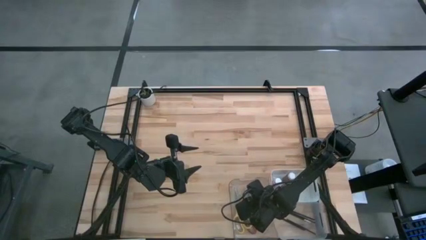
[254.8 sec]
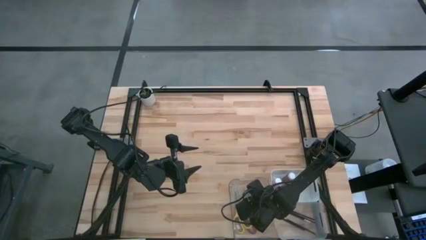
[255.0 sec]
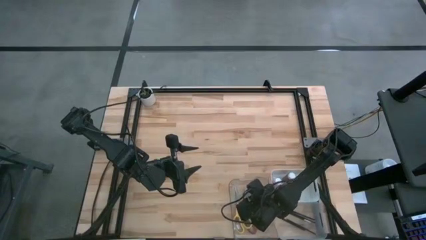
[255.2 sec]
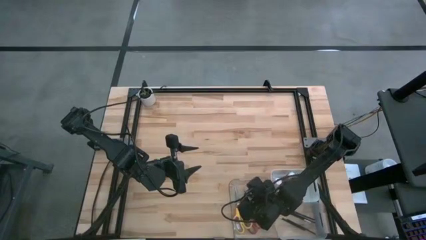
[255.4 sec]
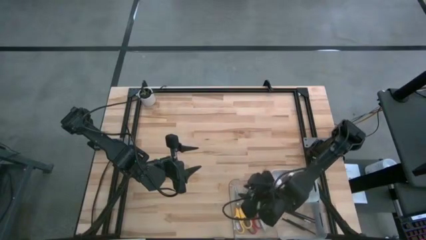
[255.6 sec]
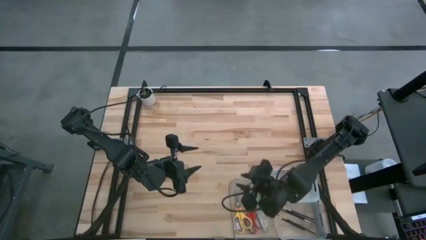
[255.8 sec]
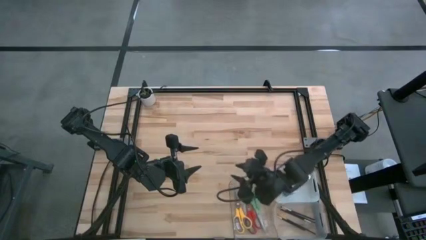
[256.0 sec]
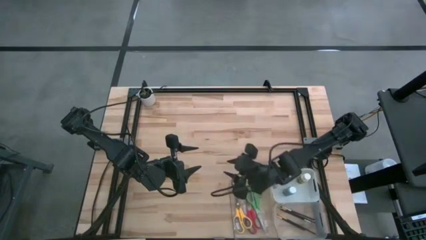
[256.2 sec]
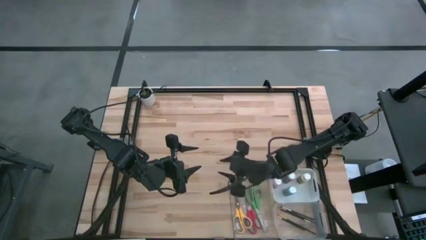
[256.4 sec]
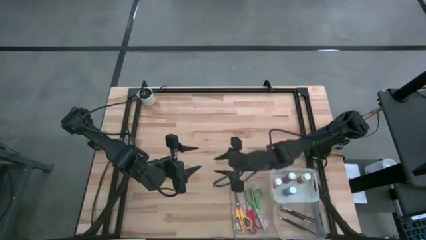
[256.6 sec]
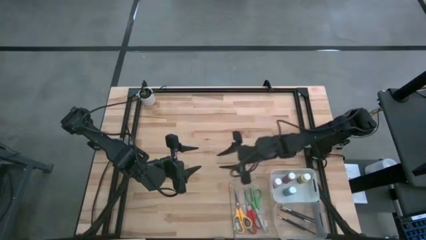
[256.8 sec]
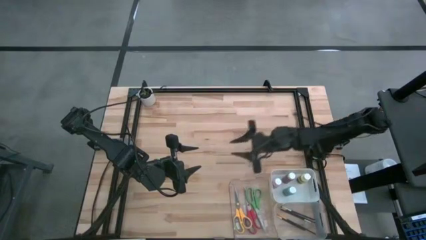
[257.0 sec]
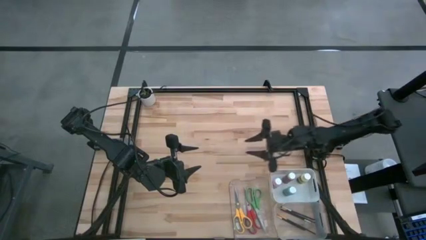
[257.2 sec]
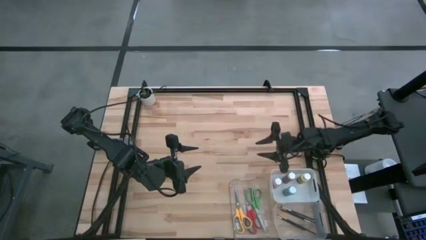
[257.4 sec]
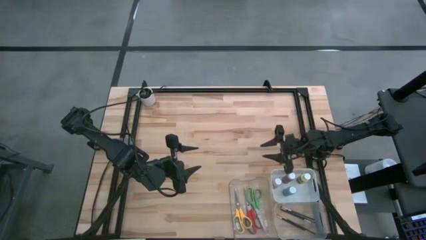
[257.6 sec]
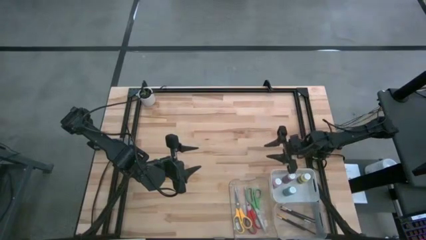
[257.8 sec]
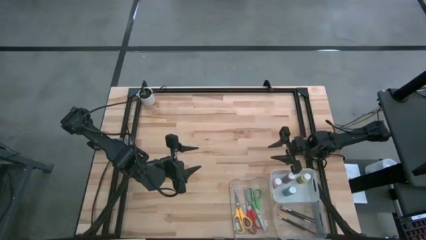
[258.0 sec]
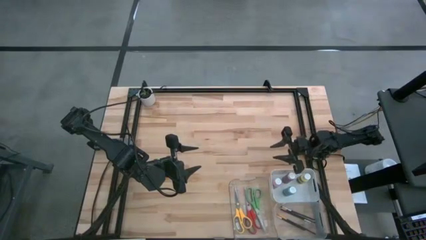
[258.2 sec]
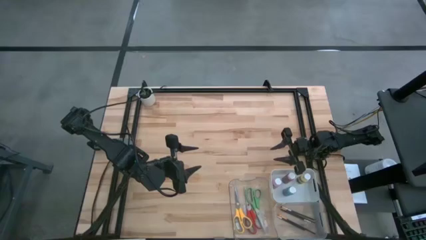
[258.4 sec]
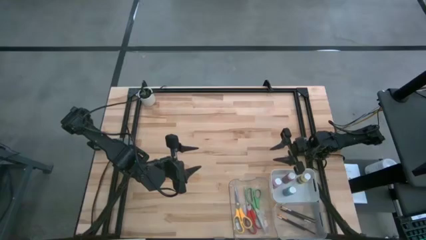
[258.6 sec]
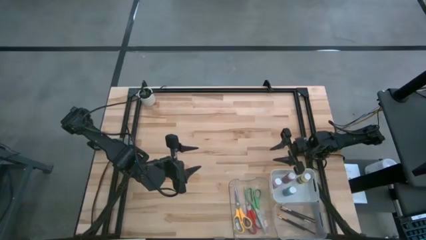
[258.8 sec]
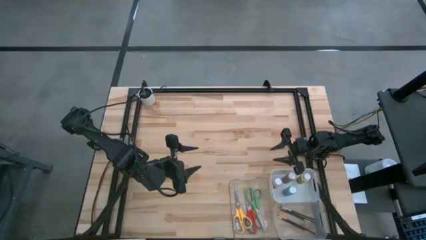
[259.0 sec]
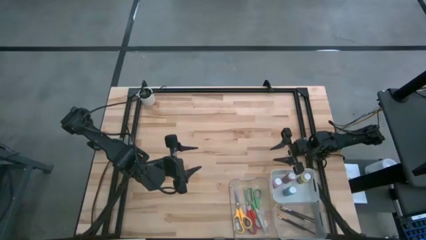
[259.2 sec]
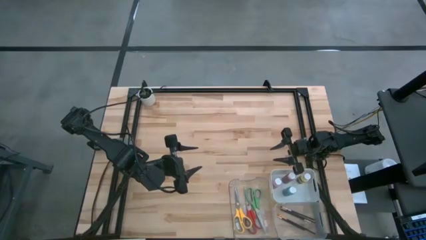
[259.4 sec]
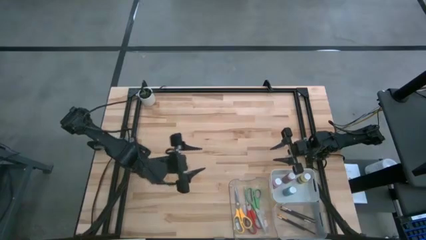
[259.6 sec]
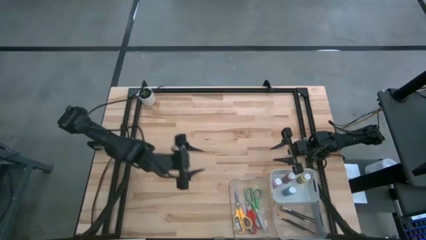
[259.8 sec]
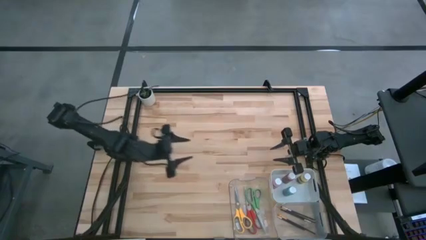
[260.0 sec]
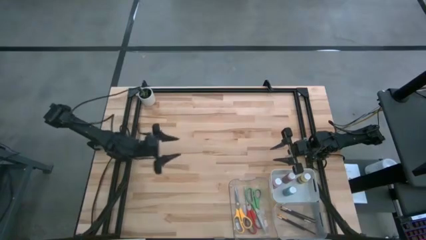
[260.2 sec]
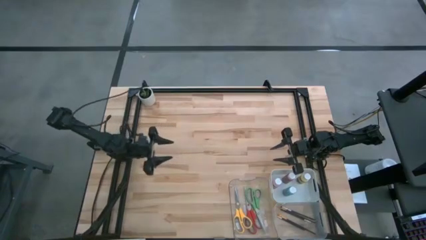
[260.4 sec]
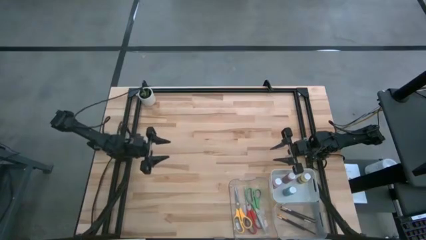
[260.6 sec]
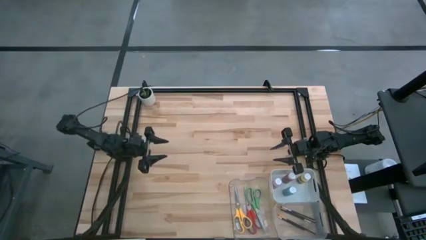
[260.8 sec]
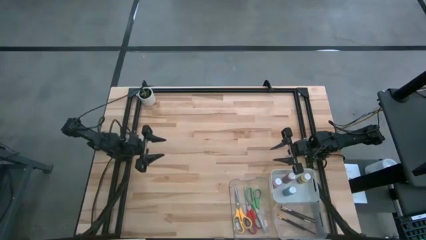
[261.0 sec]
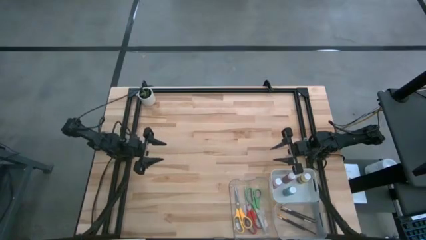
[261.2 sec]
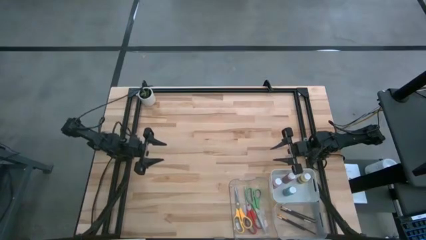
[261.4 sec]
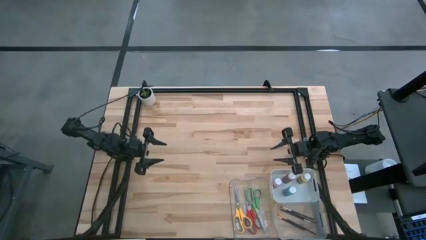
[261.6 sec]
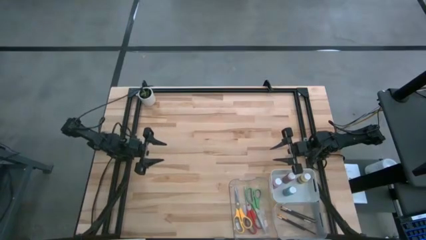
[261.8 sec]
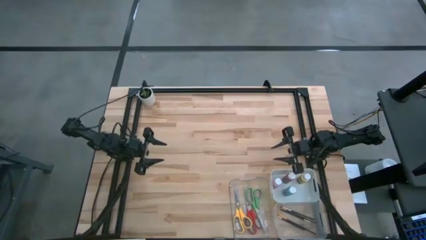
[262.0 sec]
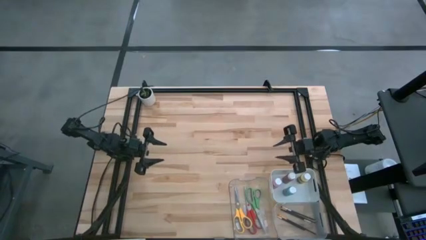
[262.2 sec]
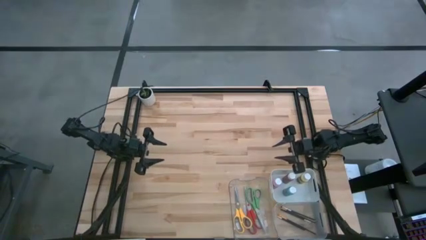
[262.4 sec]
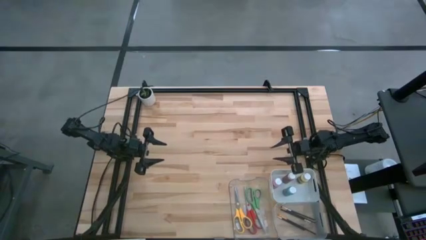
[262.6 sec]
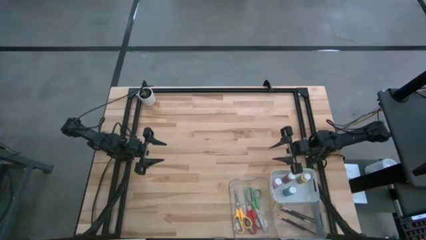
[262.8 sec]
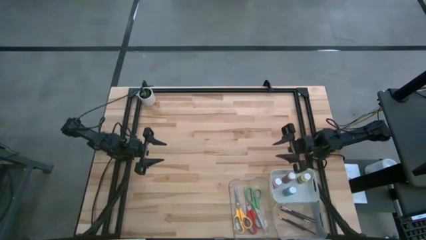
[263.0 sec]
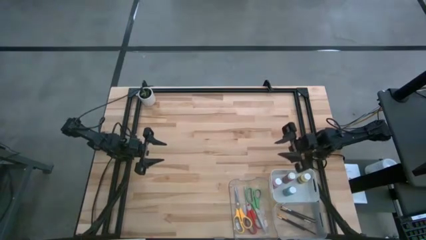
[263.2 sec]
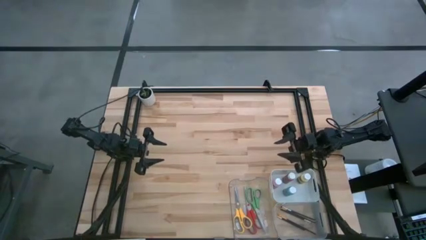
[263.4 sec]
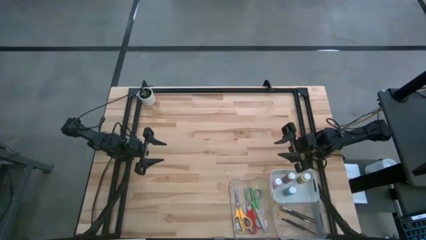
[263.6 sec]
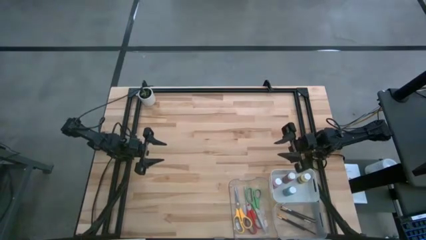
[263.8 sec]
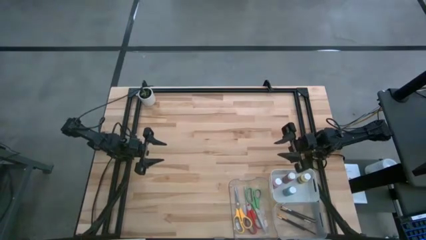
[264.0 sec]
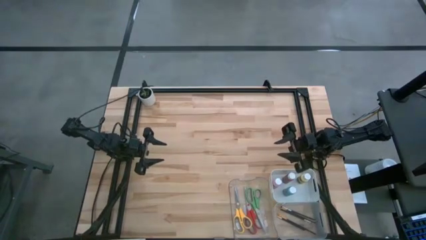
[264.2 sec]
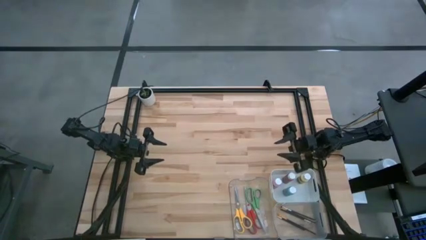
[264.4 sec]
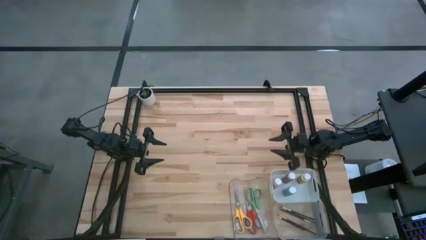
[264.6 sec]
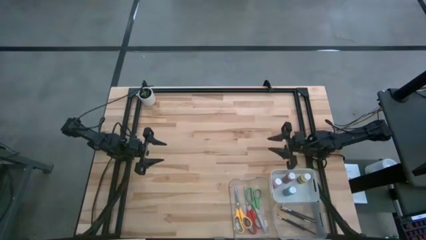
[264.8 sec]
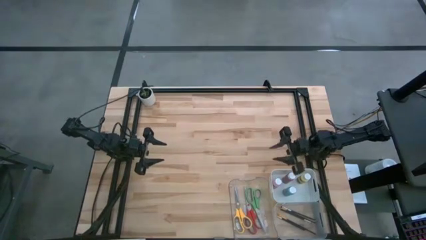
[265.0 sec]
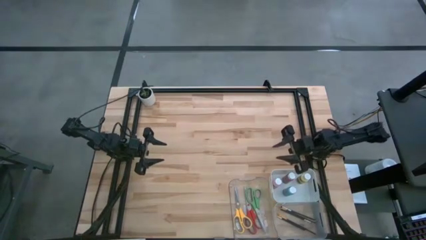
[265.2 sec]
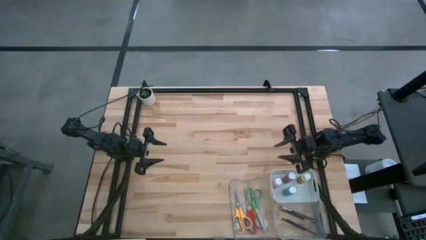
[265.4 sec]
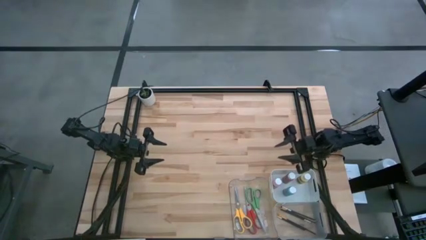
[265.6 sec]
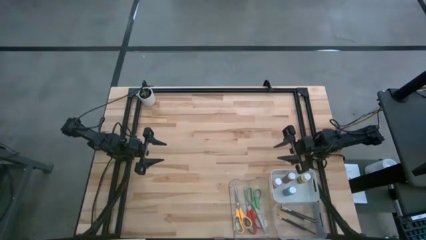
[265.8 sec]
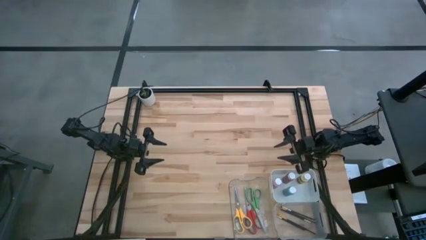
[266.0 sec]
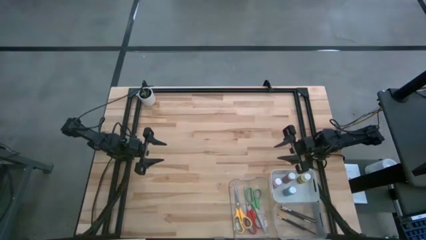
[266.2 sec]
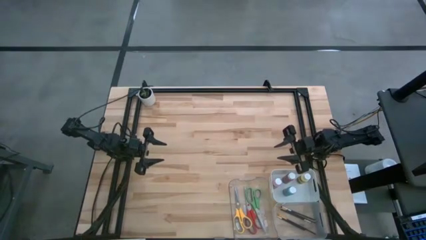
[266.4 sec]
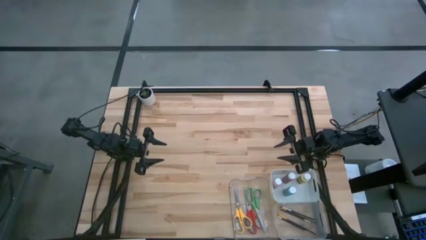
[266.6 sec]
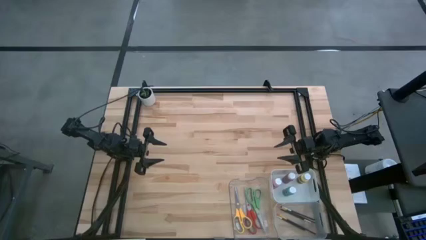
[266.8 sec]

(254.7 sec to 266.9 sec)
Task: Pick & Place Paint Supplies
Return to Home Position

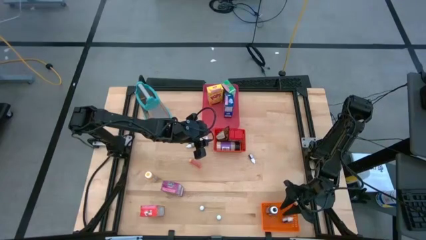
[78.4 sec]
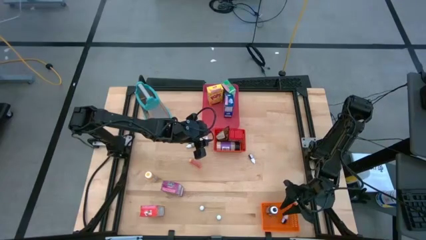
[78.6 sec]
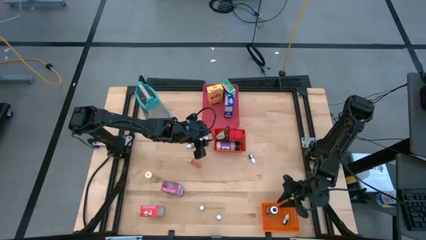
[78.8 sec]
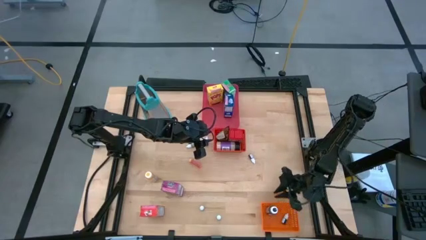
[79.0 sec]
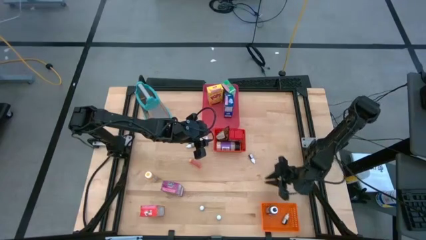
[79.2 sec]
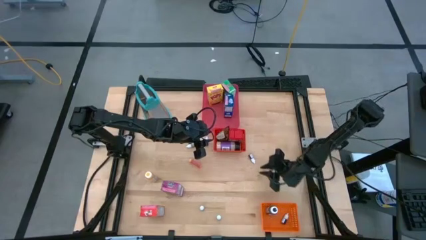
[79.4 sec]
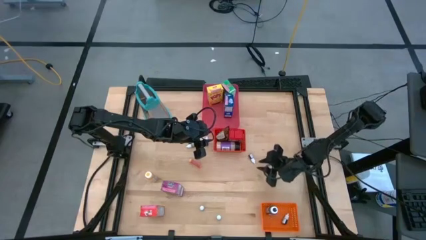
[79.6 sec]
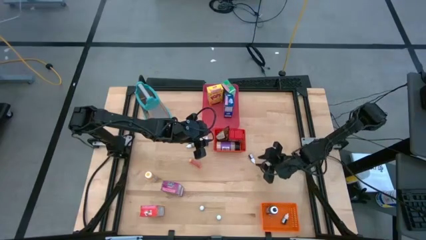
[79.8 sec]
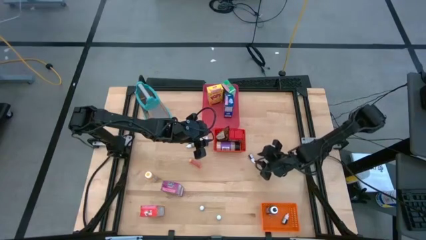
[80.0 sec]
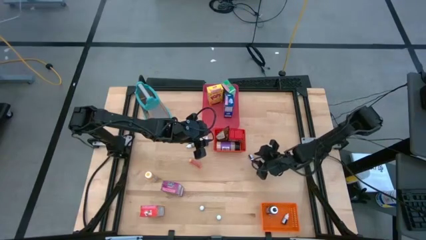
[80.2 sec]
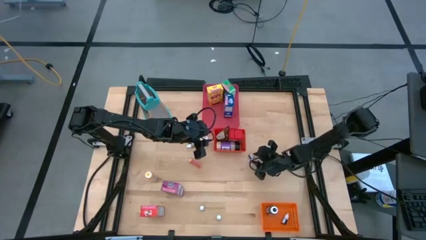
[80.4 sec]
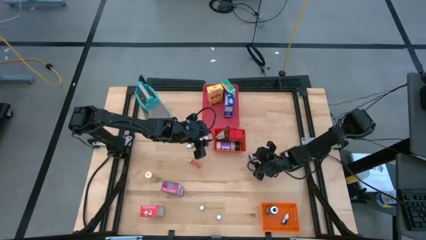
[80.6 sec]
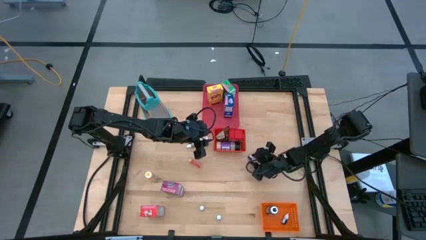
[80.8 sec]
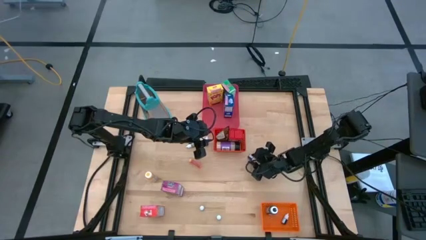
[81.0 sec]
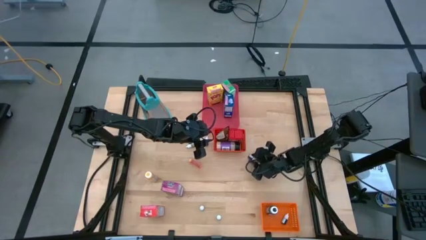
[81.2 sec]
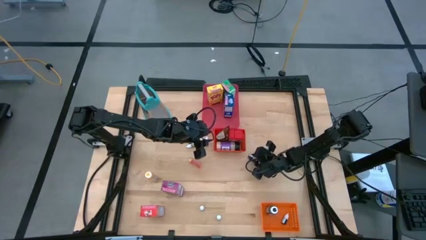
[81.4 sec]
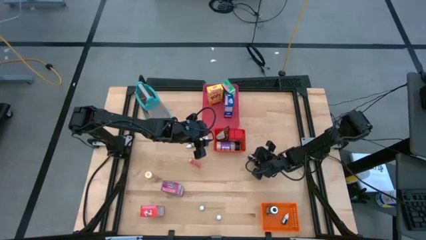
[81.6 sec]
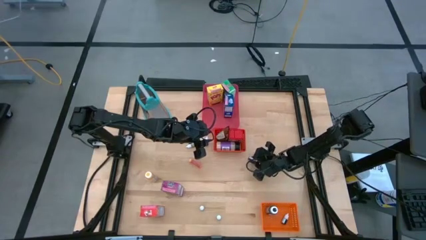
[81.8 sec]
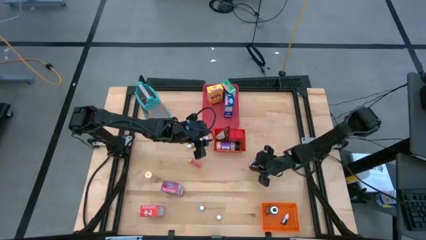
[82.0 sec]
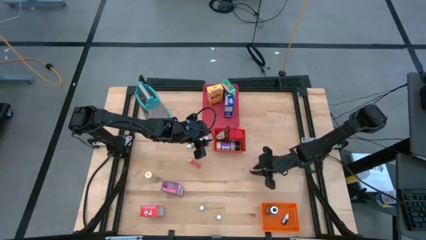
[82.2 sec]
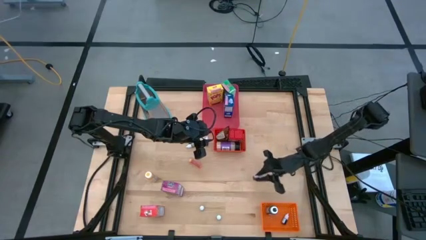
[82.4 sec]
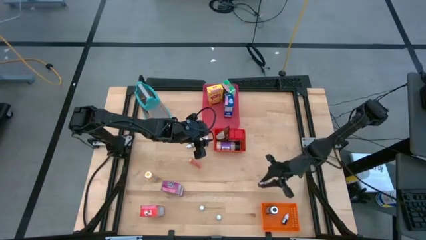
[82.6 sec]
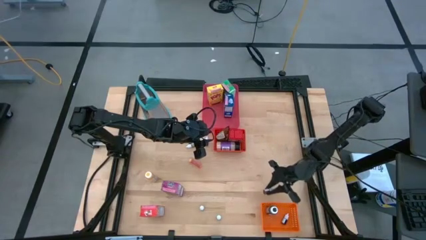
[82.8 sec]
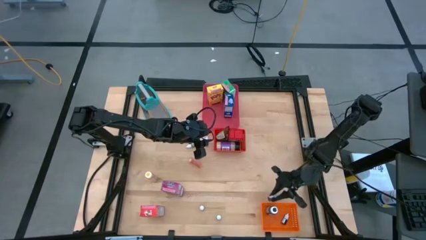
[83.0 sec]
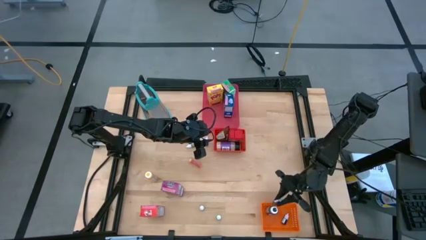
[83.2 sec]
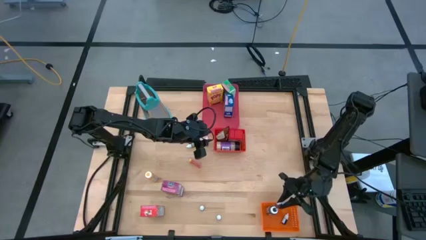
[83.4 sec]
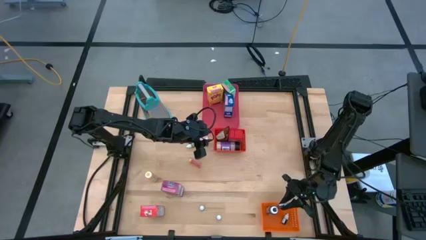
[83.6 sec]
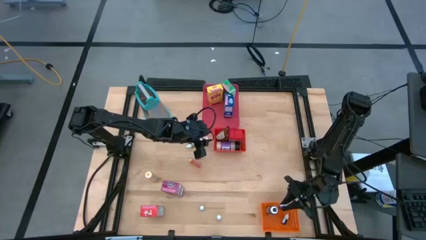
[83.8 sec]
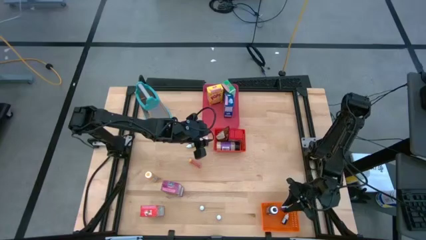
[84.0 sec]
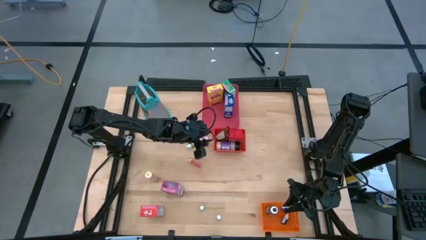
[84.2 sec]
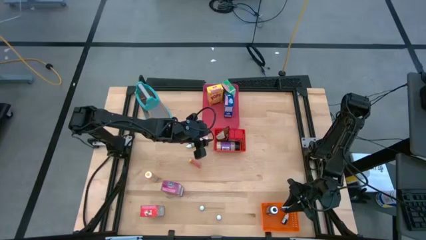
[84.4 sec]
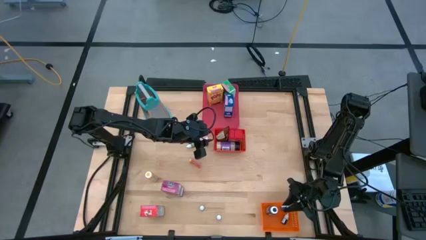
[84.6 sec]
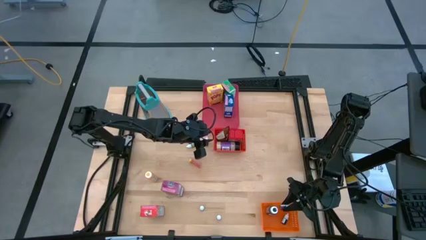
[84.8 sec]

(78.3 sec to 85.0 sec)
Task: Pick & Place Kitchen Items
Put the red food coloring bottle into the orange bin
